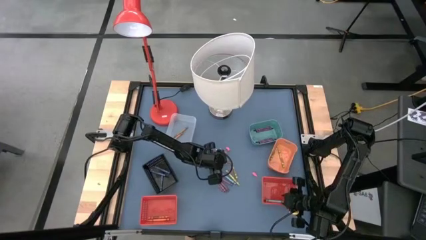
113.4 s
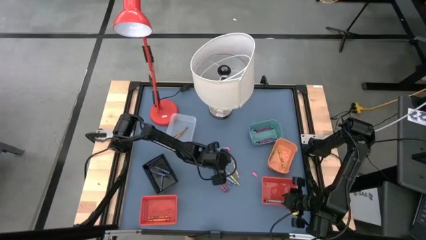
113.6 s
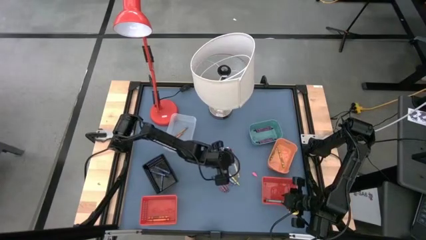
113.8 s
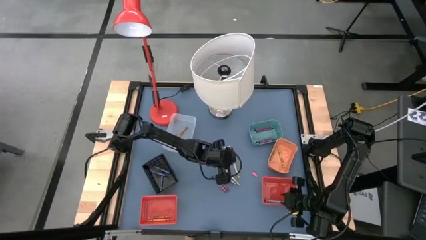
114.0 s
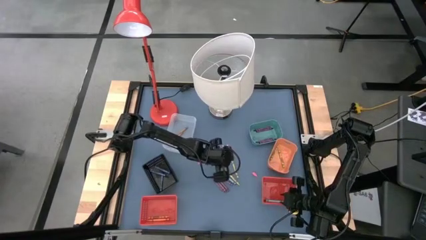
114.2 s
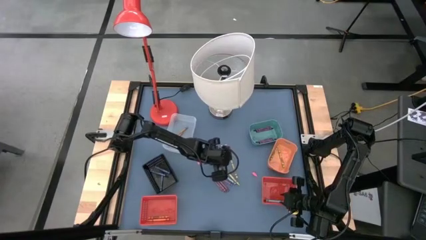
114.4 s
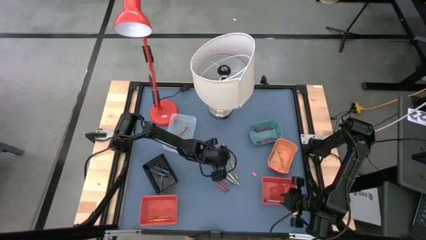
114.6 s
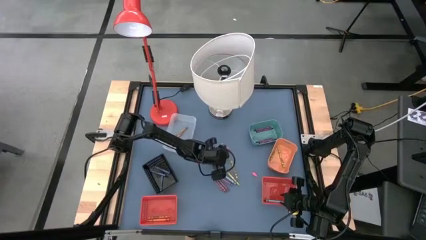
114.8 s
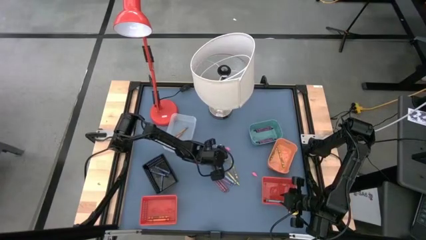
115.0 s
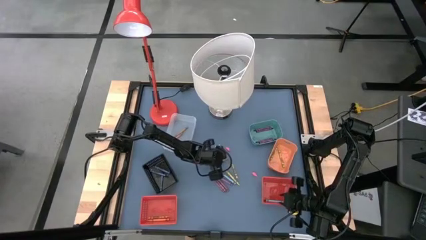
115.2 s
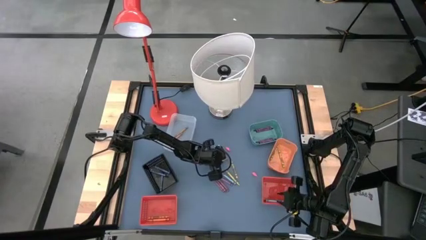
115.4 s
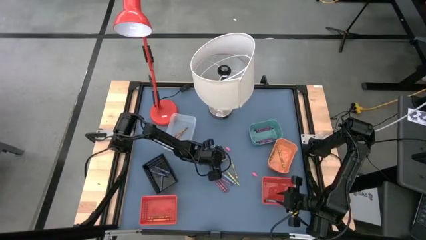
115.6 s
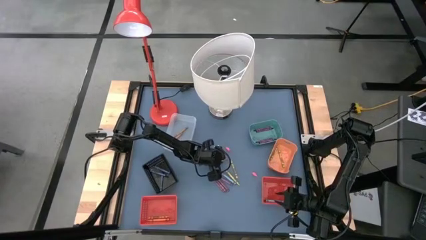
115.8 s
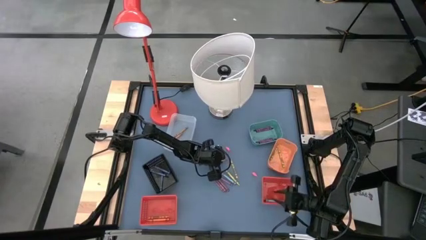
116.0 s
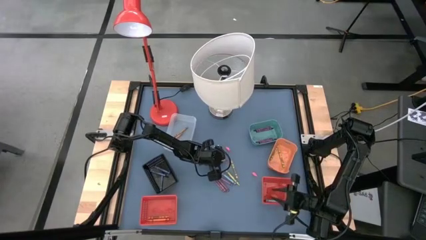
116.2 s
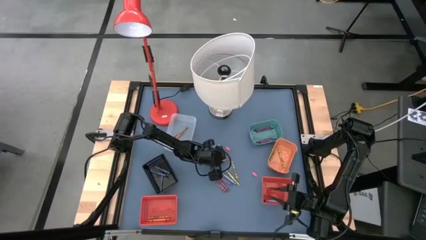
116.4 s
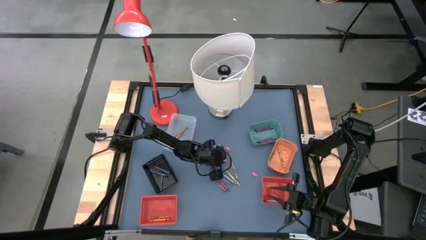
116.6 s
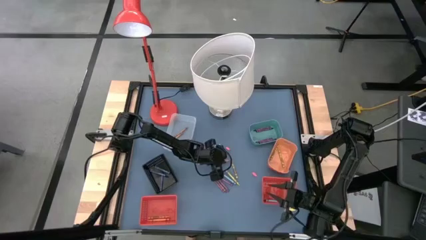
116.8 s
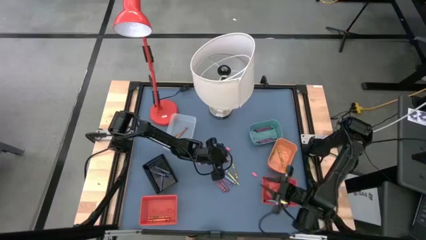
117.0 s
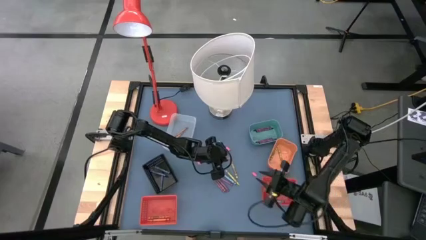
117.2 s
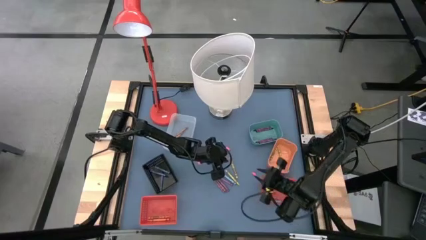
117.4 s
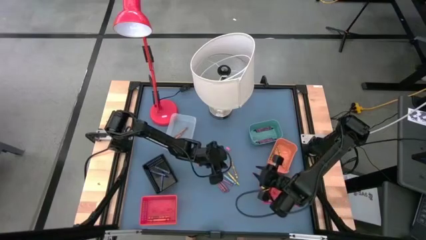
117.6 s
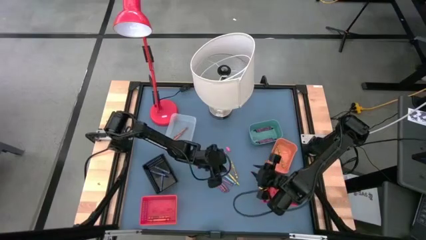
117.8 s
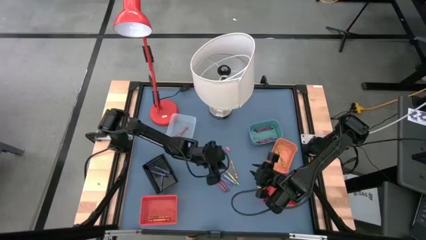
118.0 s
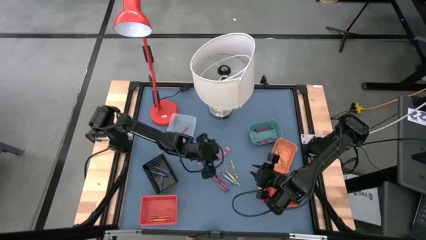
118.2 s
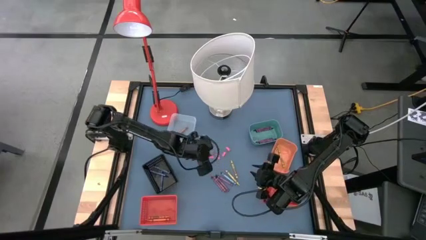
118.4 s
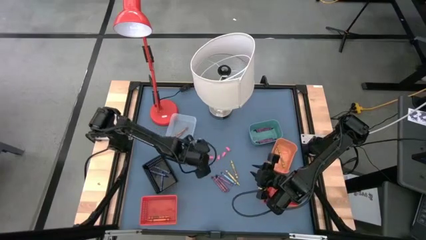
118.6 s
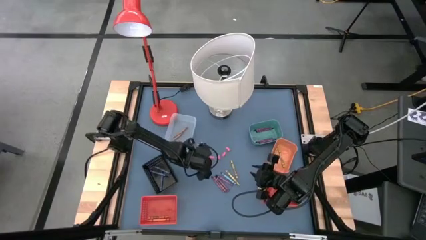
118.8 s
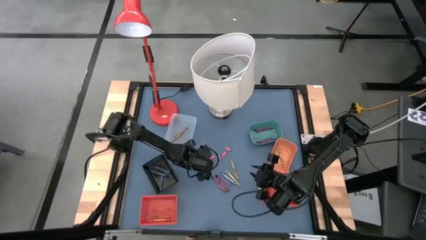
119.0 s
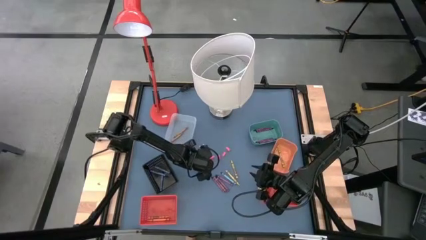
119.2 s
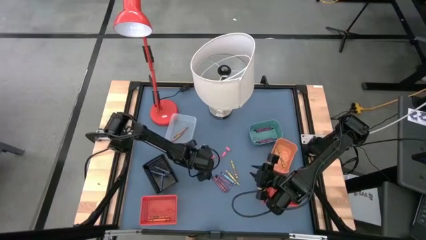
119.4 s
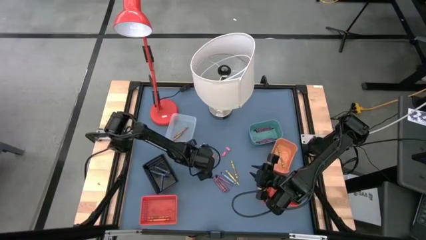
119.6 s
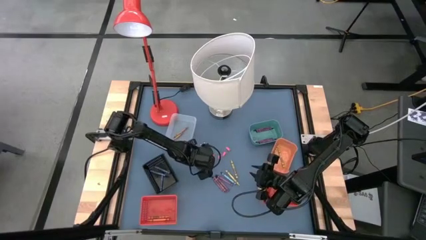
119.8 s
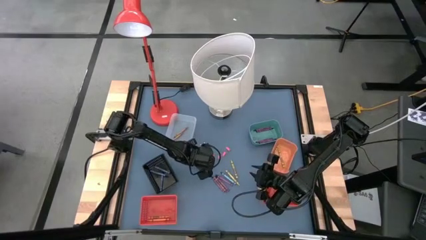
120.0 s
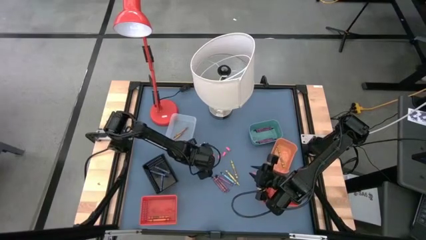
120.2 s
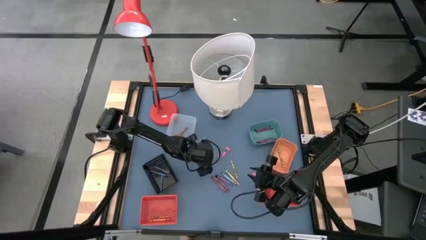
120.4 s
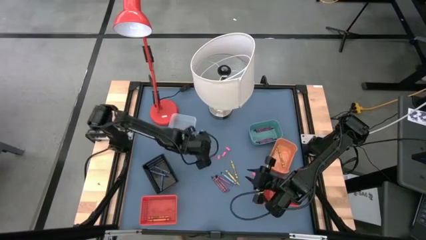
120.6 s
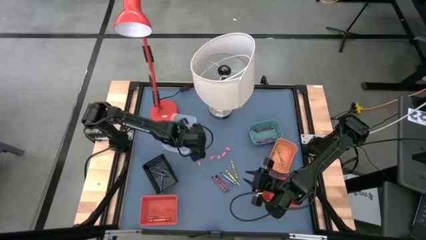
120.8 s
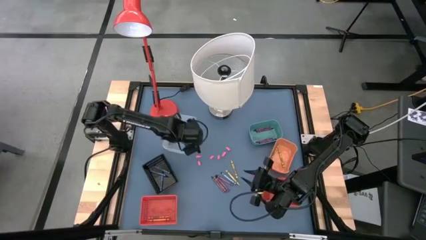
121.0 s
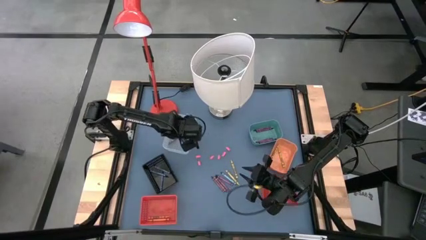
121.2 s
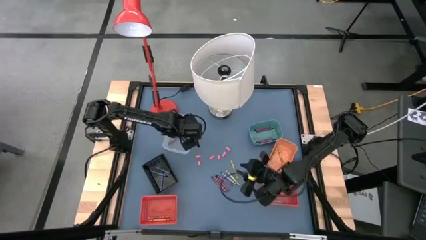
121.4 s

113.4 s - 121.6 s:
Task: Sort crayons
Put the brown crayon into the transparent bin

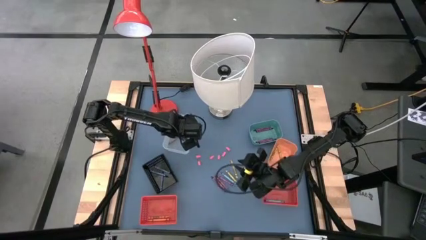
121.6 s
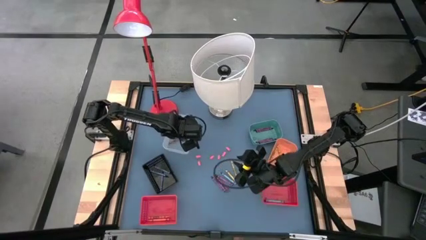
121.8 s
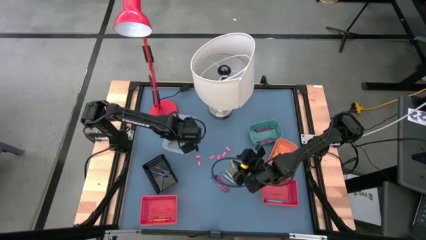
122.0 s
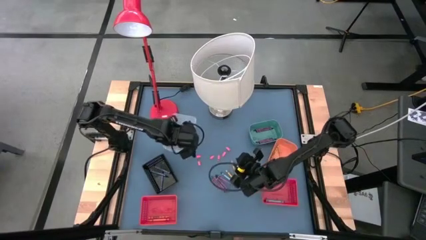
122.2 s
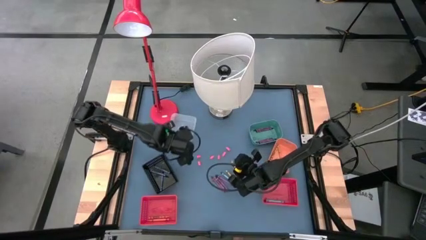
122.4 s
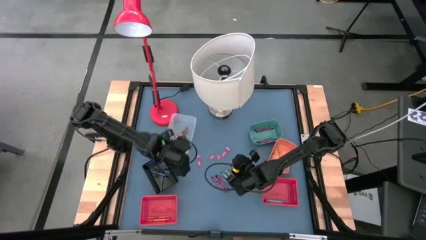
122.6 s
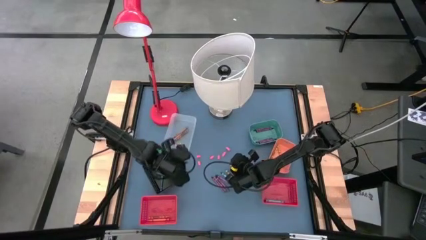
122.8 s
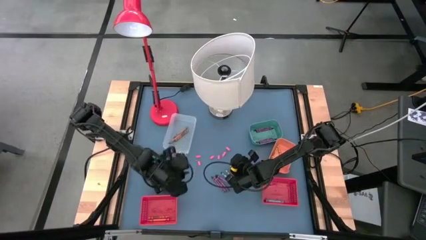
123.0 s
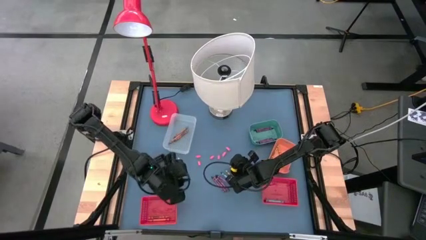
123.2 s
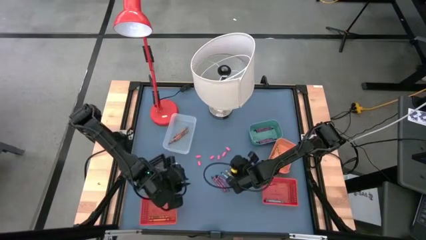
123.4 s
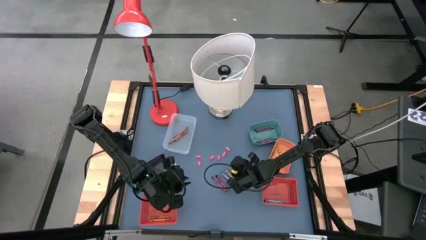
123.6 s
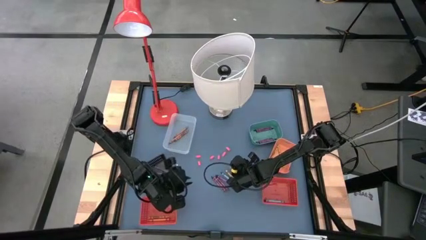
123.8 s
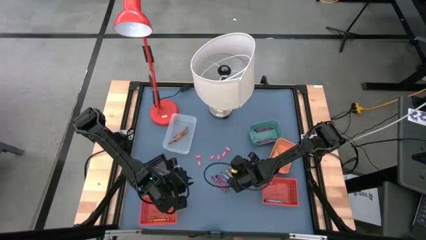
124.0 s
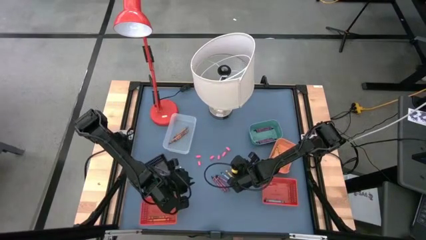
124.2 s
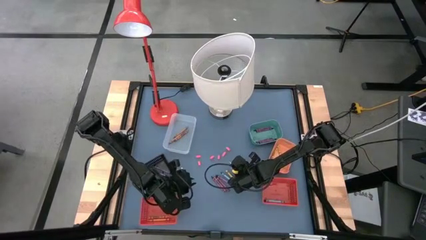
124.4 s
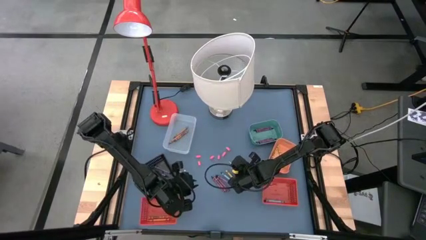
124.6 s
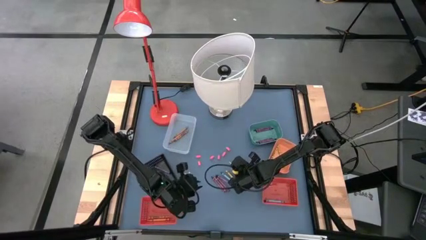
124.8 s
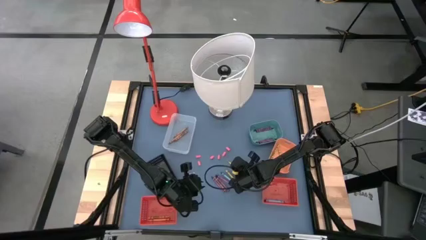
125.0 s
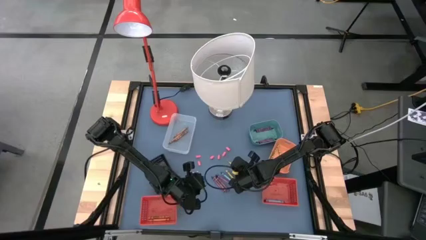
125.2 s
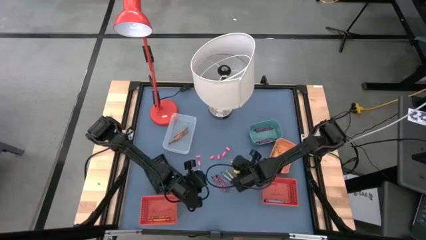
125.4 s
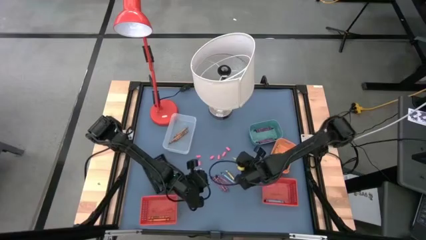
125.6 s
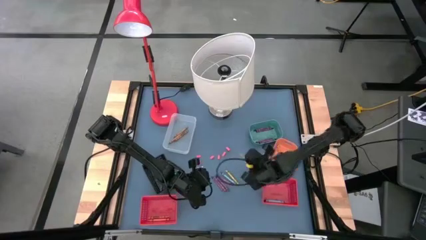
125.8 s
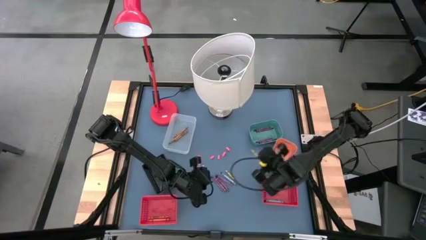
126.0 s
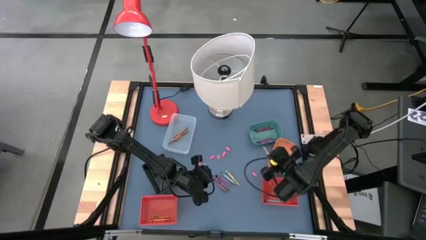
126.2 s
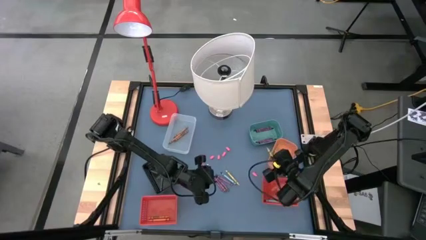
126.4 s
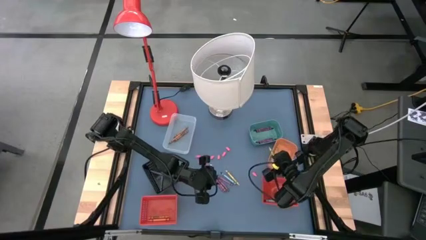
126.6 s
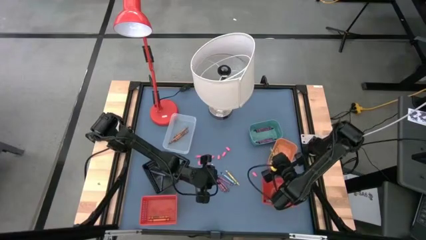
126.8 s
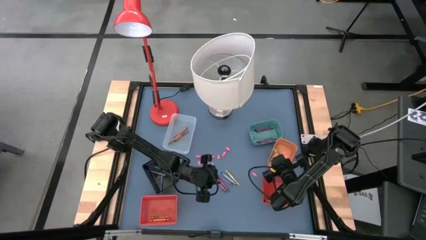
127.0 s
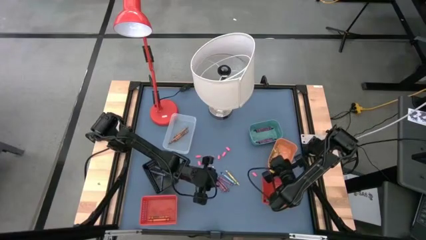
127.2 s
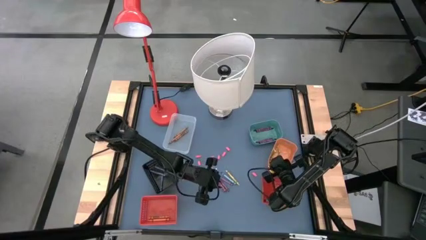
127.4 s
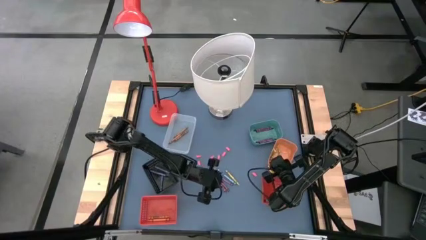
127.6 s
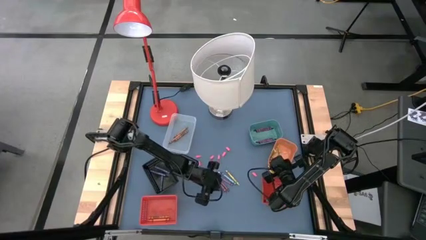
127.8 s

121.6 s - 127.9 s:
Put the yellow crayon into the orange bin

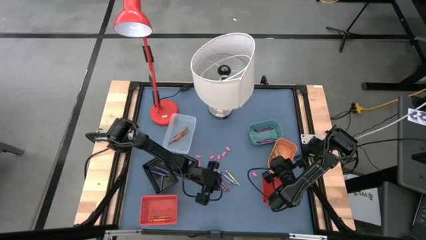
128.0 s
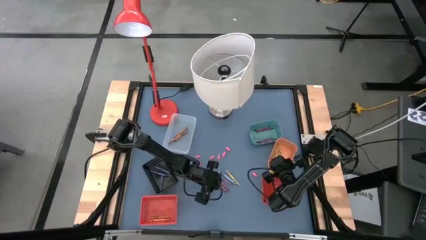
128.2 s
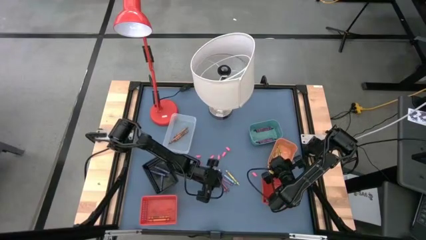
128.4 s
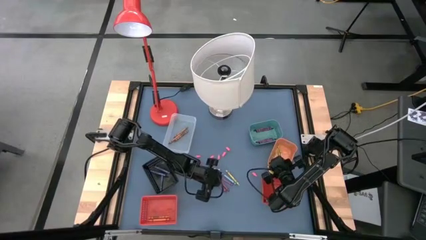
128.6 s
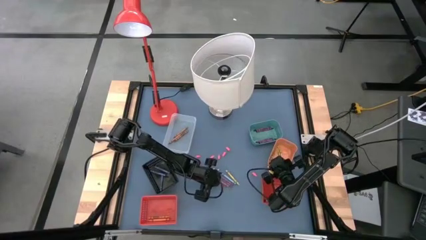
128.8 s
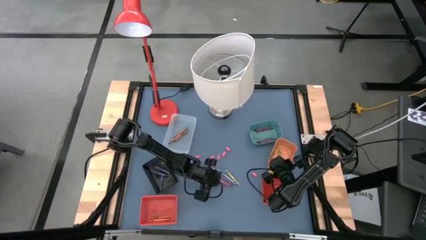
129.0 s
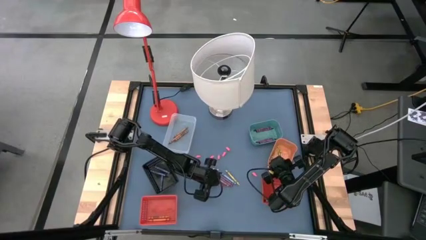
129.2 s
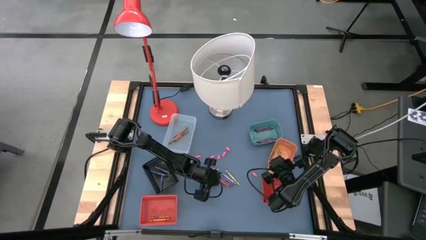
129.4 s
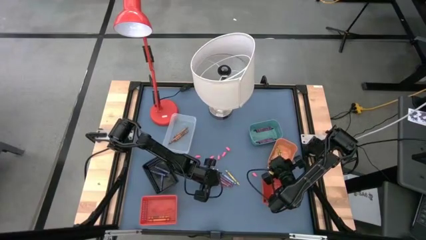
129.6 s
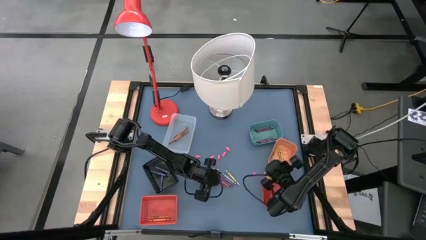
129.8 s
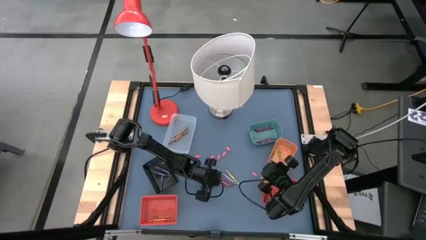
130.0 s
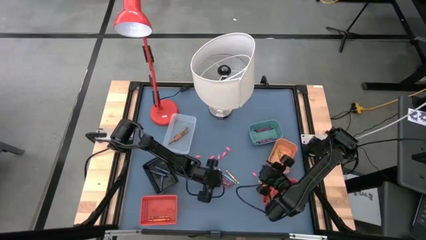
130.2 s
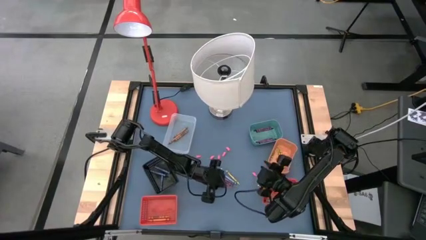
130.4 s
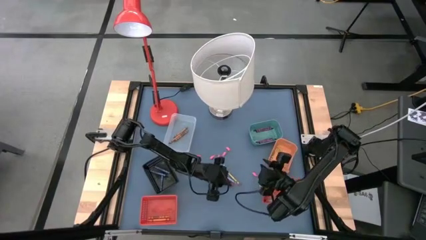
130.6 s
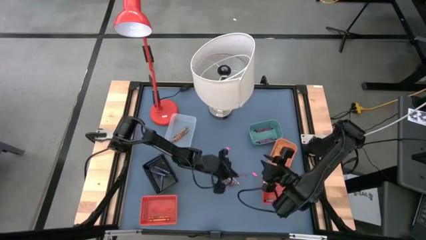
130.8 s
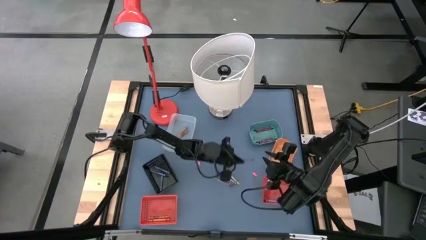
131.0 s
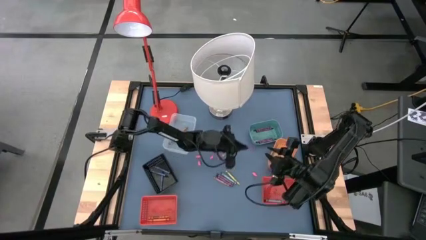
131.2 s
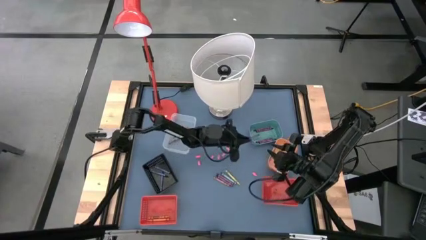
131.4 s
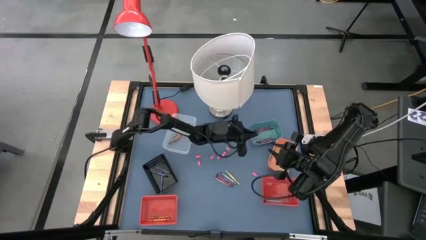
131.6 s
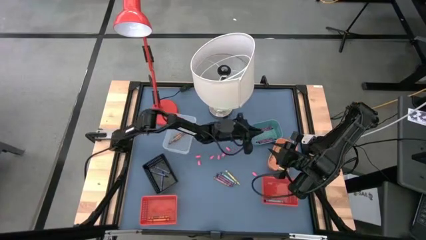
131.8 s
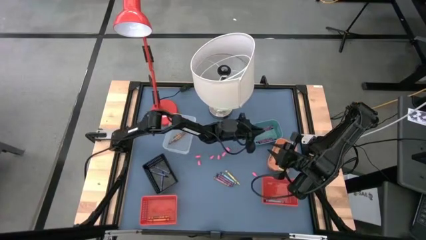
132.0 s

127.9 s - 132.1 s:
Put the violet crayon into the green bin
